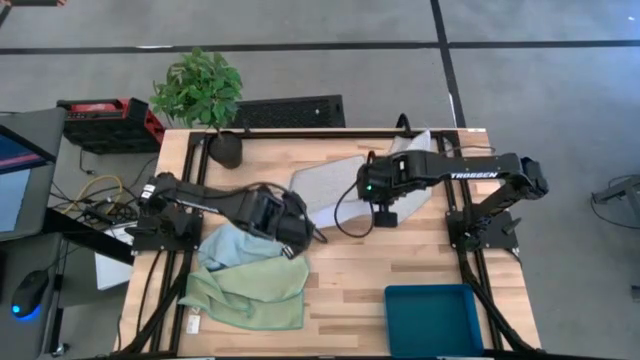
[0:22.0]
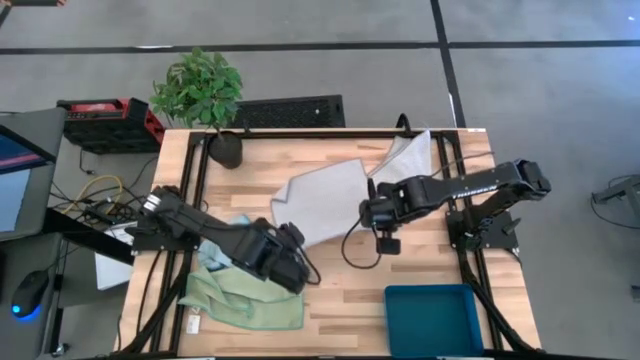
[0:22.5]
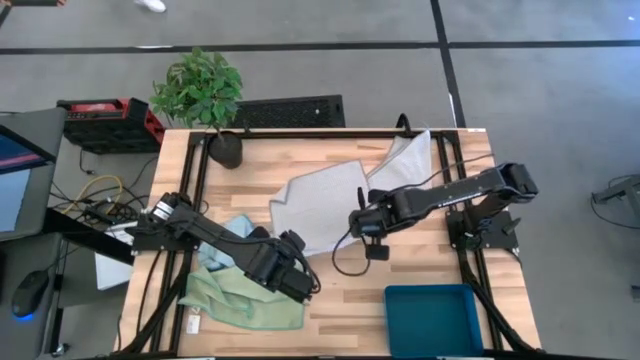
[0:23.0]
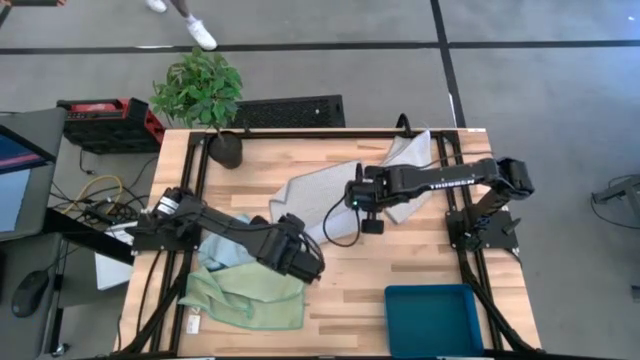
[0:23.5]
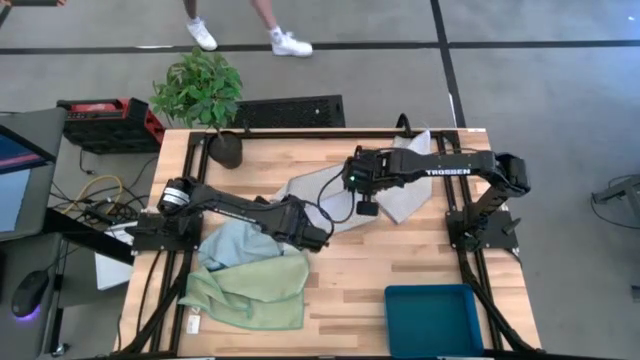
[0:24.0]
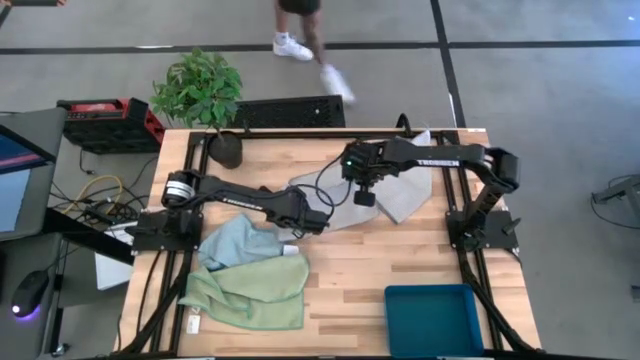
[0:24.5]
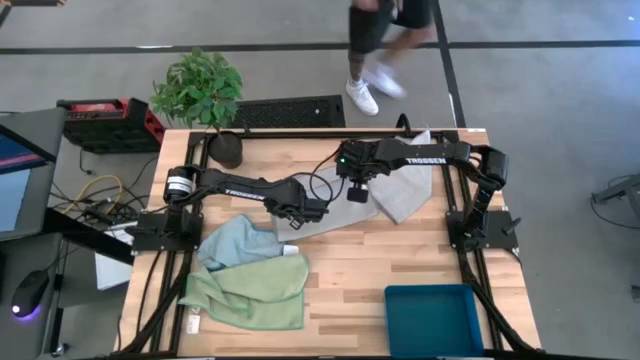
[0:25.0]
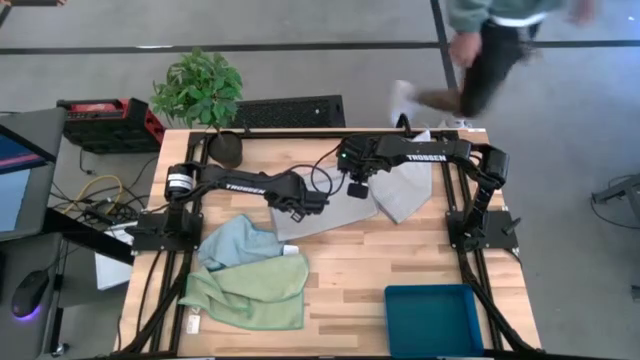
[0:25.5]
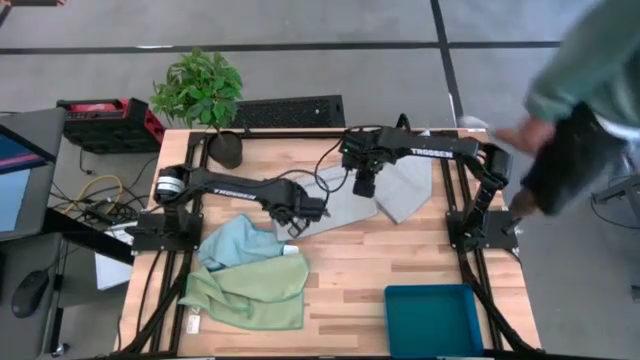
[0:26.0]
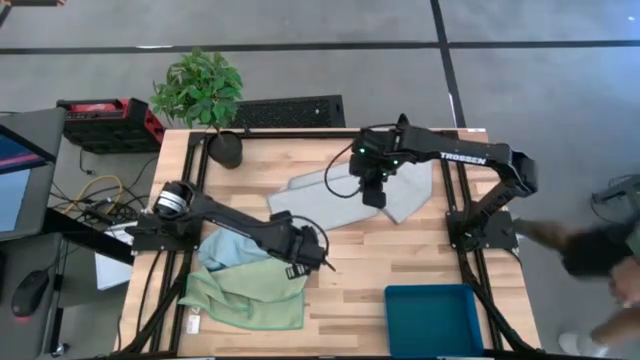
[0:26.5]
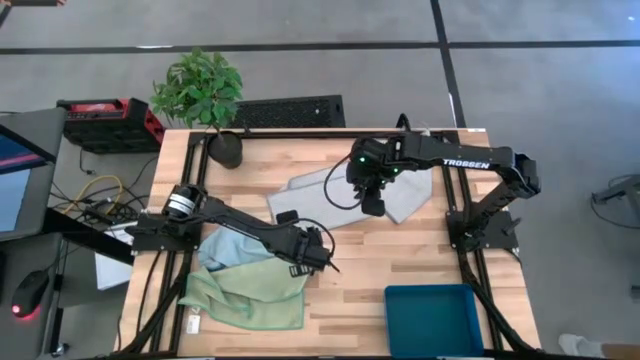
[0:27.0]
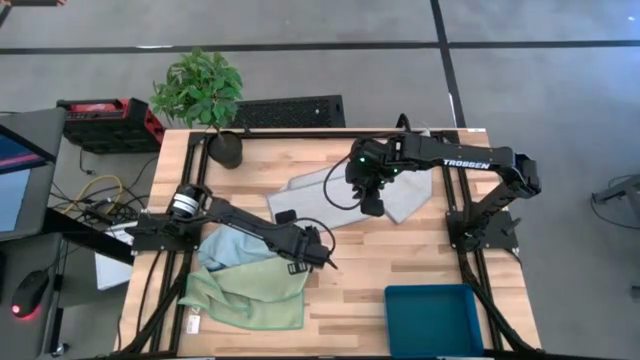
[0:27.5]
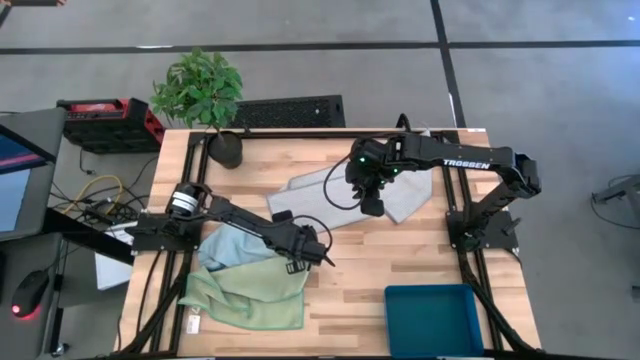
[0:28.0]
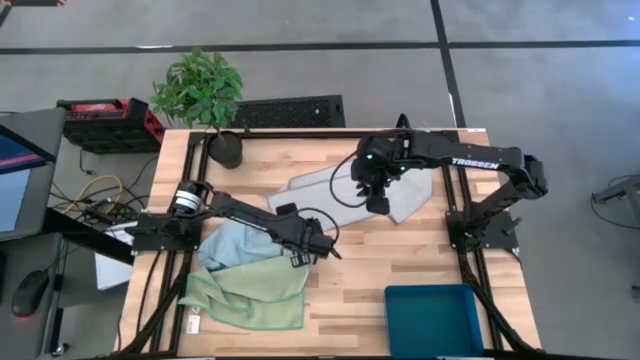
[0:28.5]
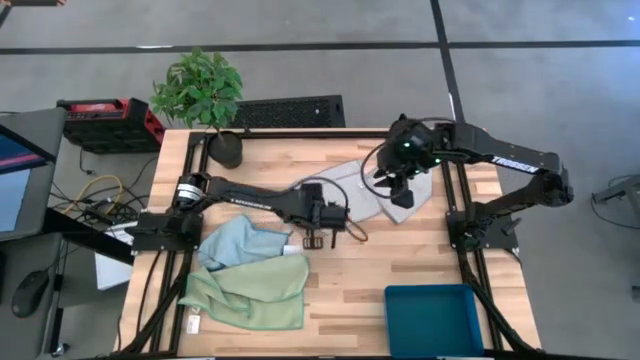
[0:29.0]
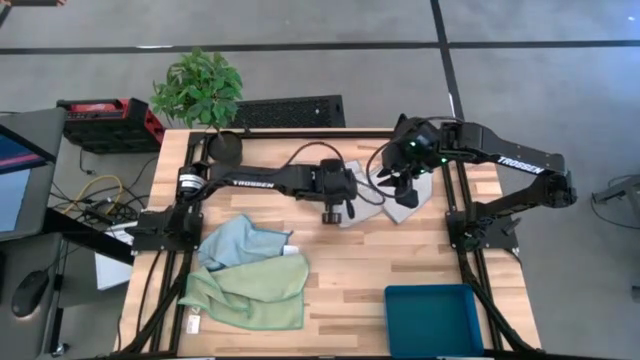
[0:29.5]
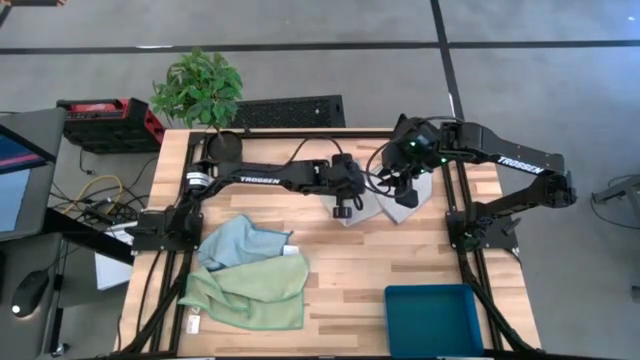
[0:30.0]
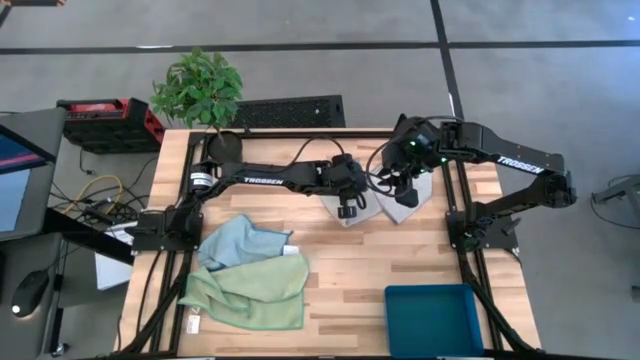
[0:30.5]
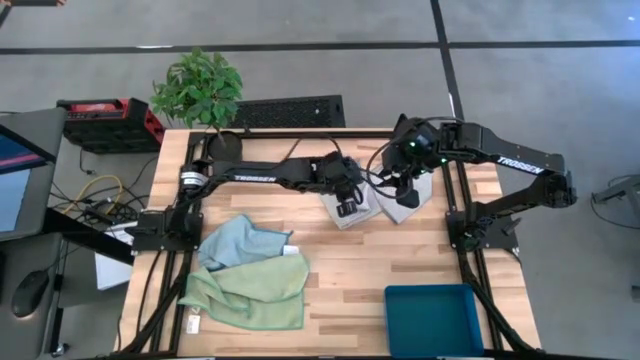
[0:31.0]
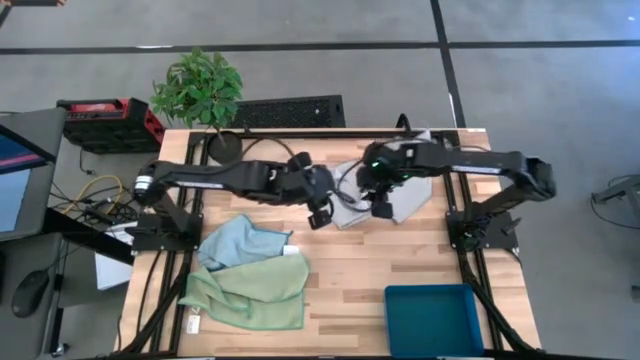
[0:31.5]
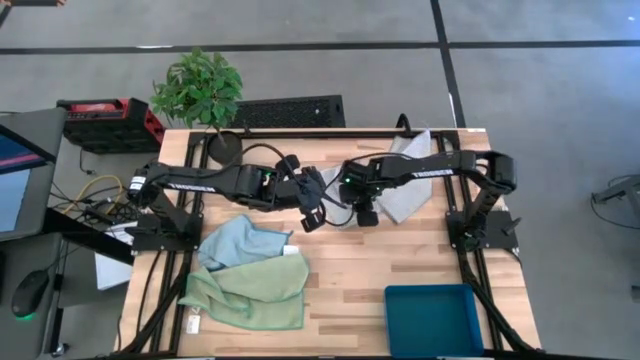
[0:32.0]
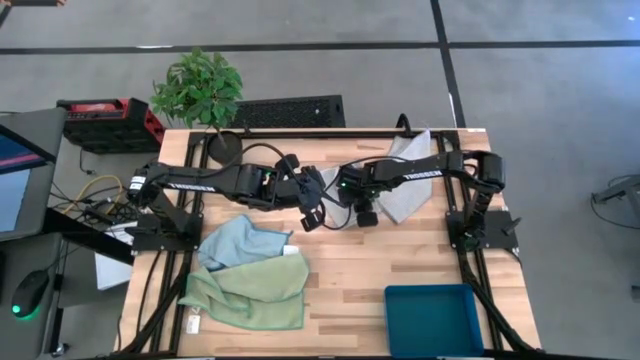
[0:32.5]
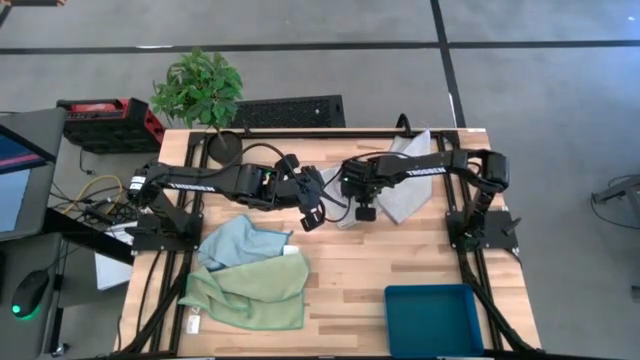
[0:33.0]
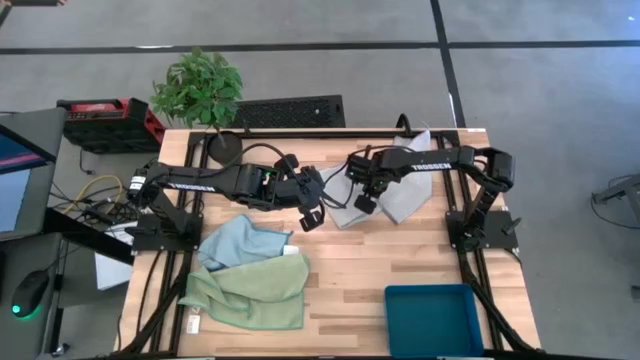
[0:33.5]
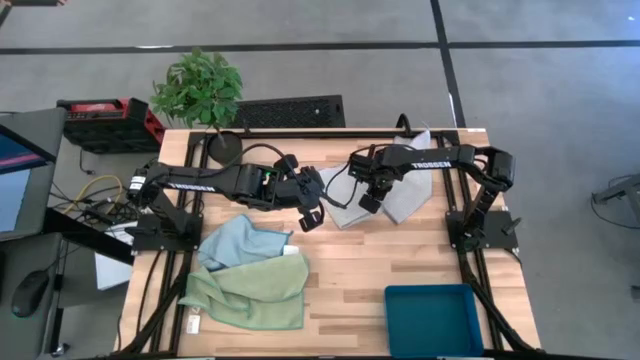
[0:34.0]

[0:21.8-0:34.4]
Task: Fold microfiber towels
Fold the left gray microfiber towel

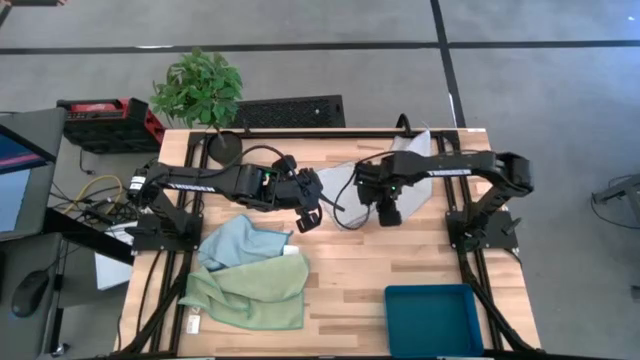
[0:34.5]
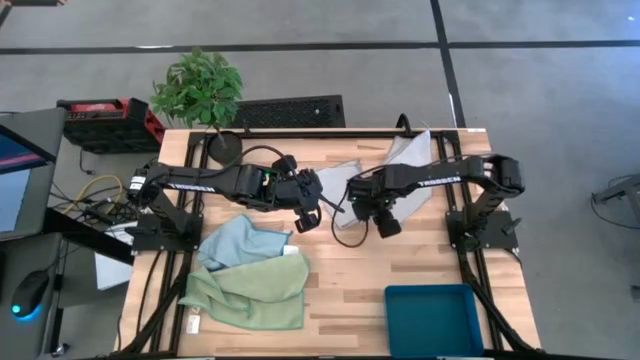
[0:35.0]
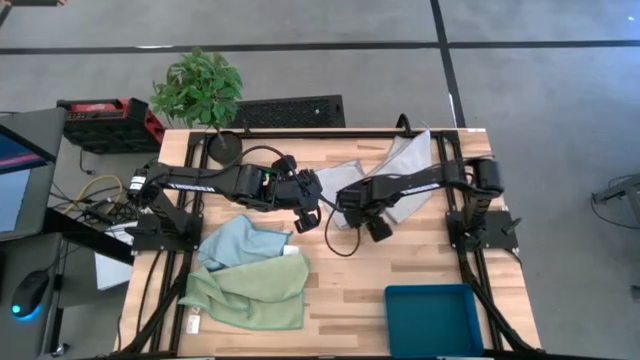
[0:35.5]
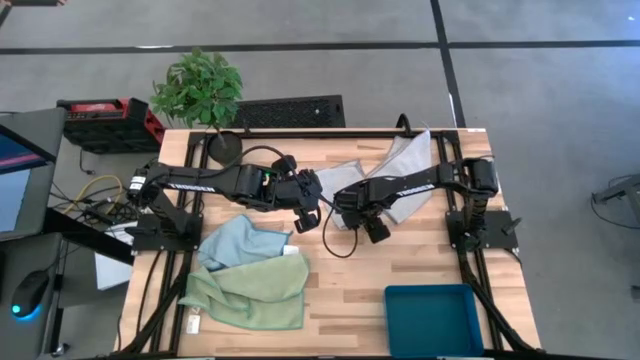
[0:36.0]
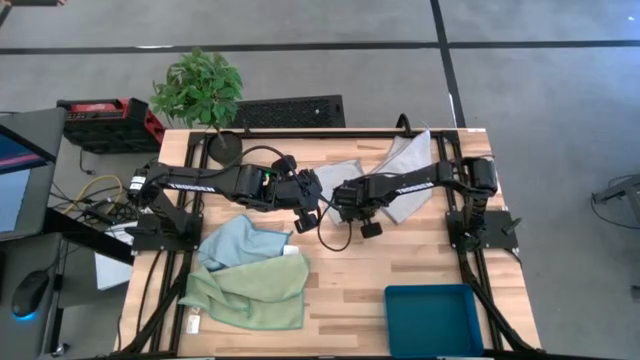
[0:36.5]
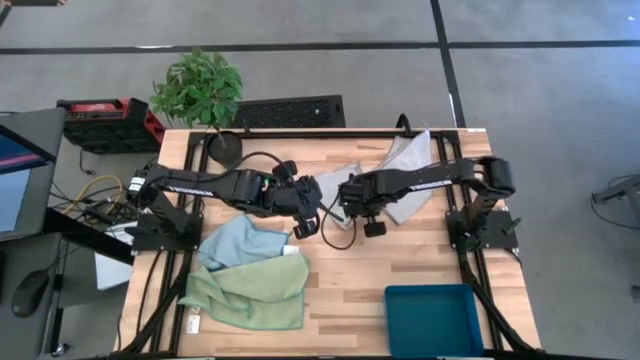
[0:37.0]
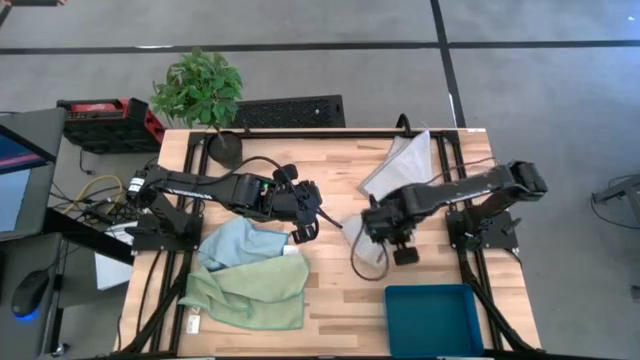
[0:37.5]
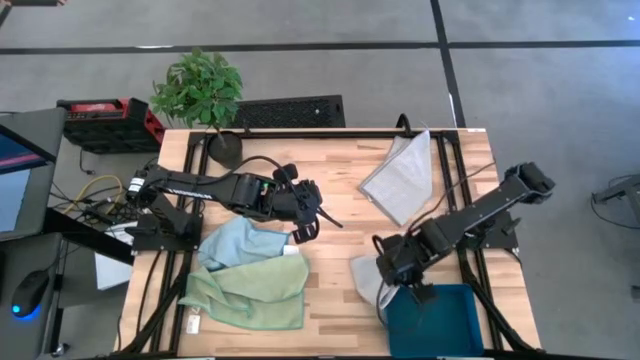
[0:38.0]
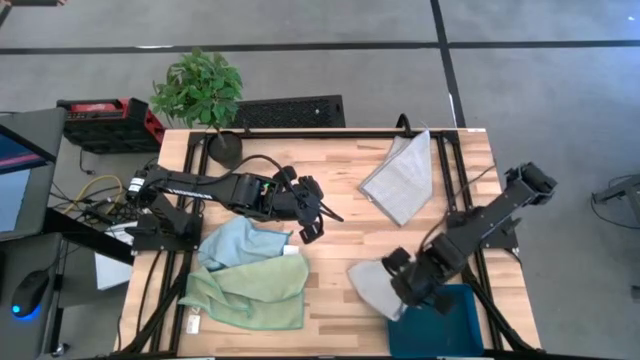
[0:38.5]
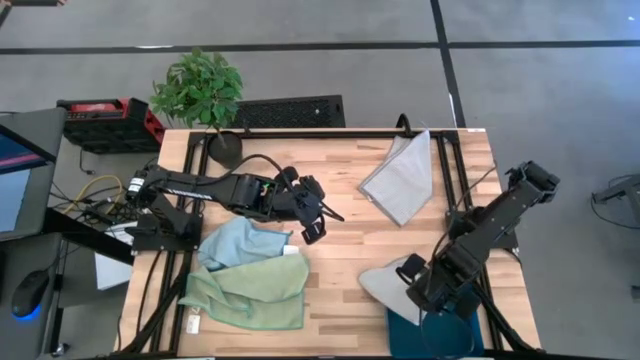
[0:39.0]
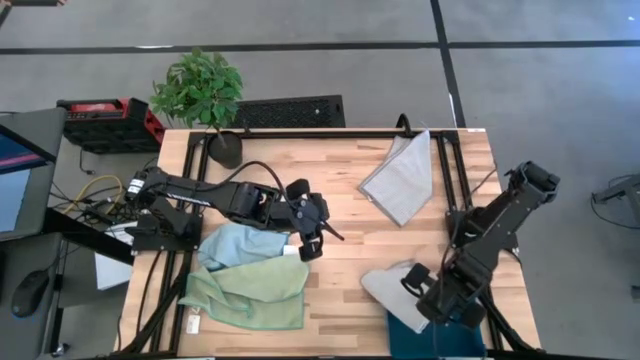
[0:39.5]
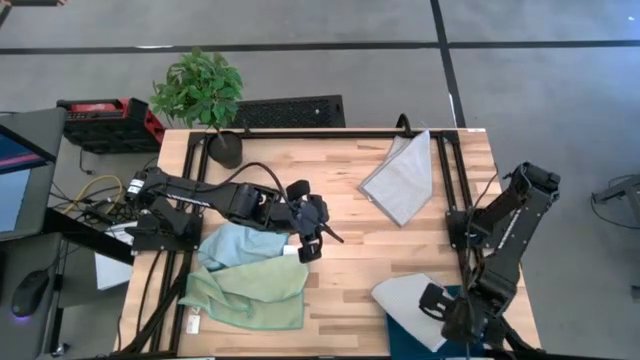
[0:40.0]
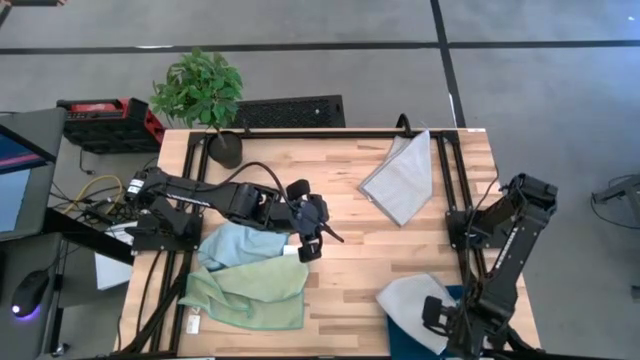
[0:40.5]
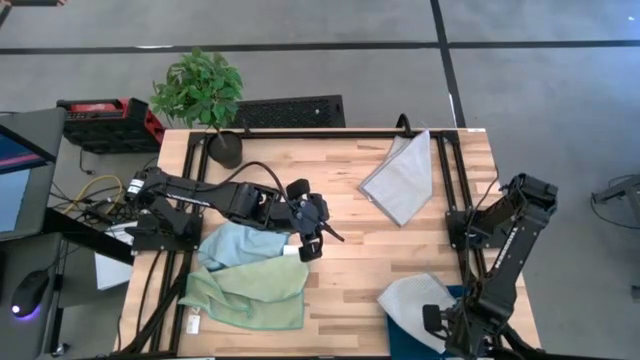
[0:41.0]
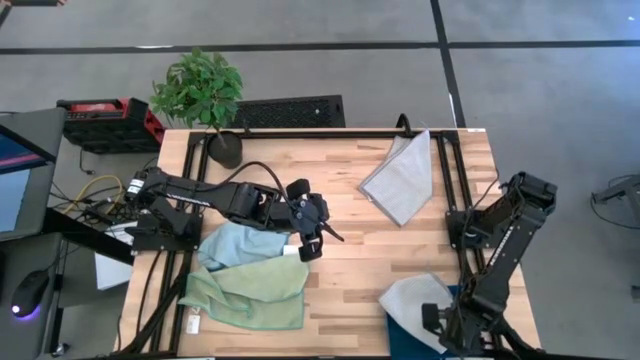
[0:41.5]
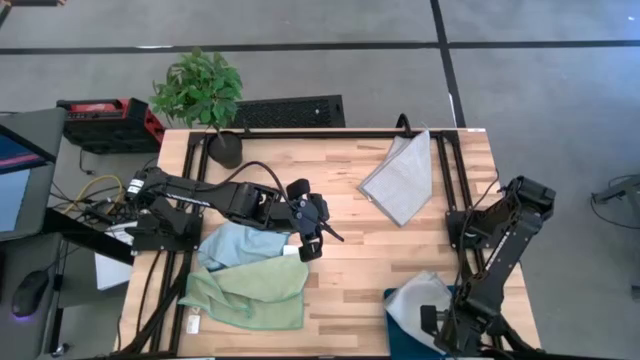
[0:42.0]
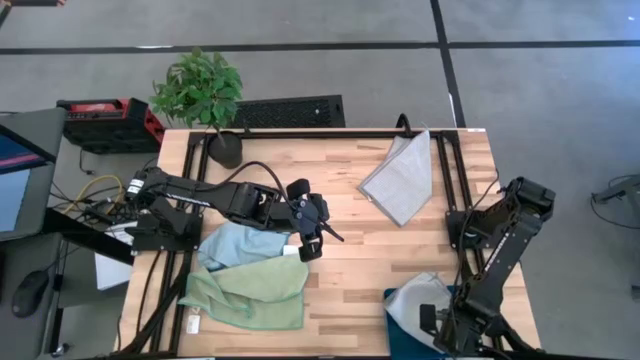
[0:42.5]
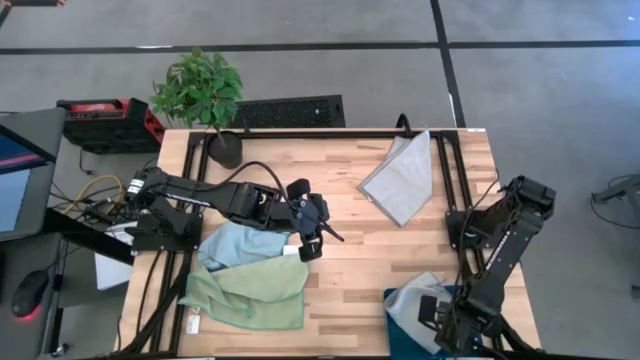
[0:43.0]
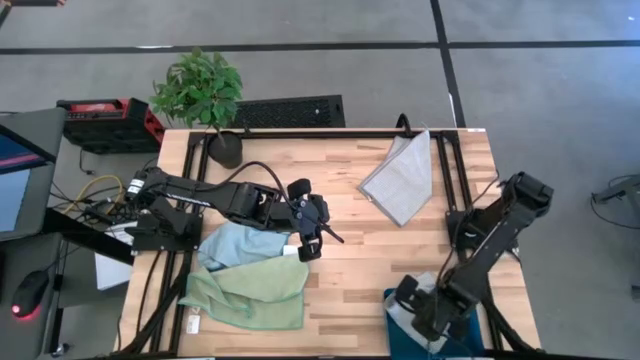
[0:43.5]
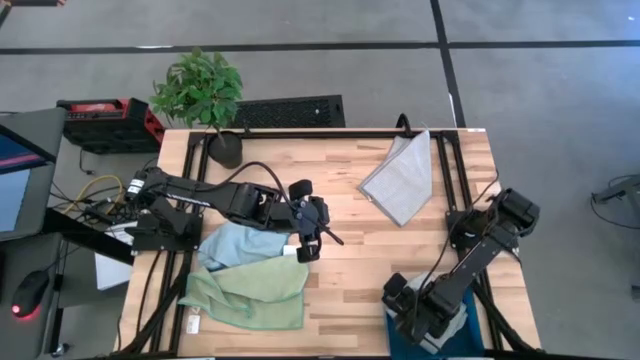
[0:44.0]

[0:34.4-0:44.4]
Put the left folded gray microfiber towel into the blue bin
